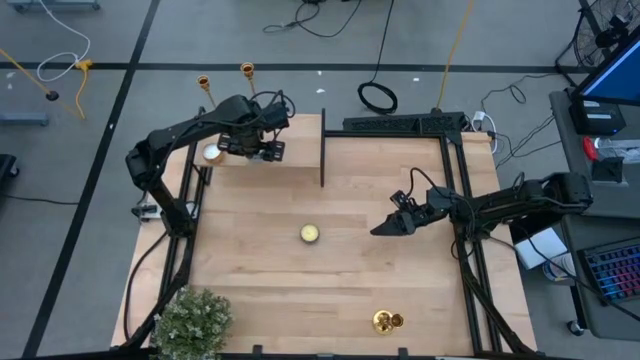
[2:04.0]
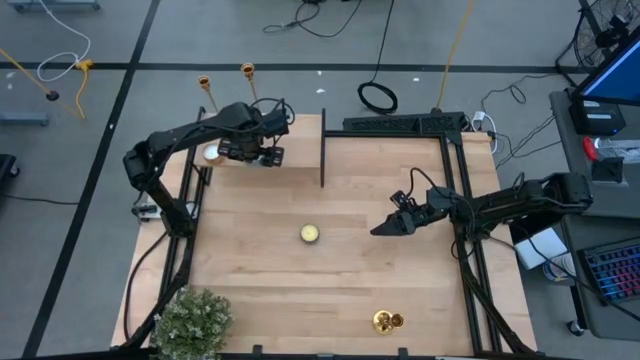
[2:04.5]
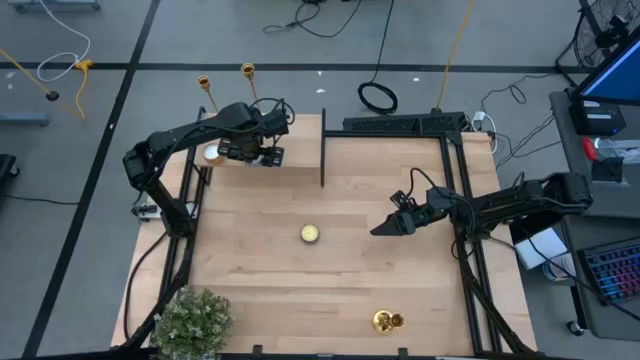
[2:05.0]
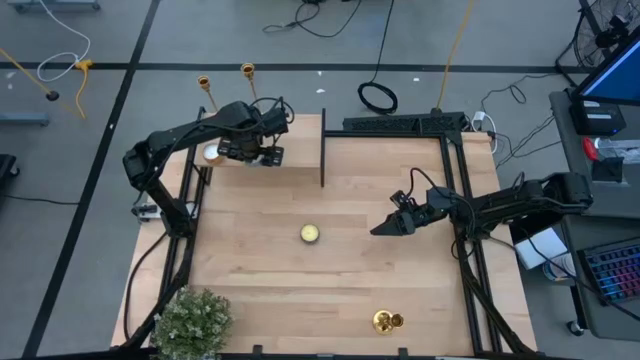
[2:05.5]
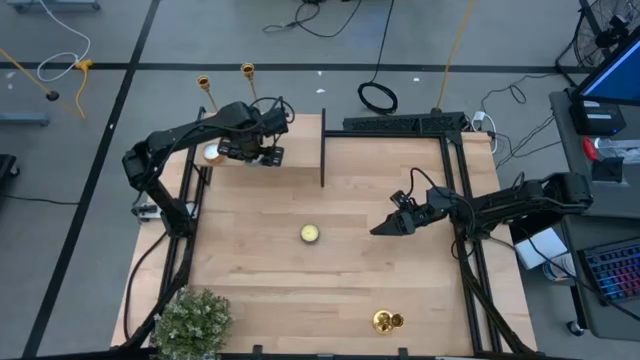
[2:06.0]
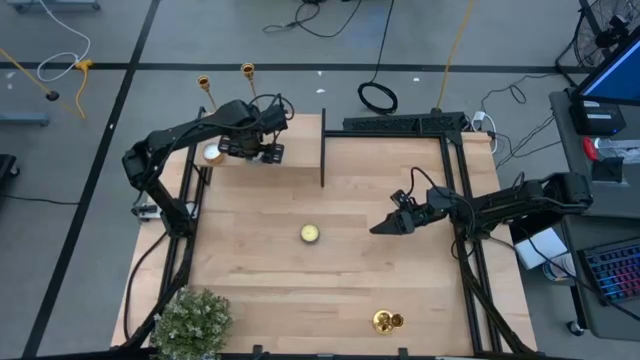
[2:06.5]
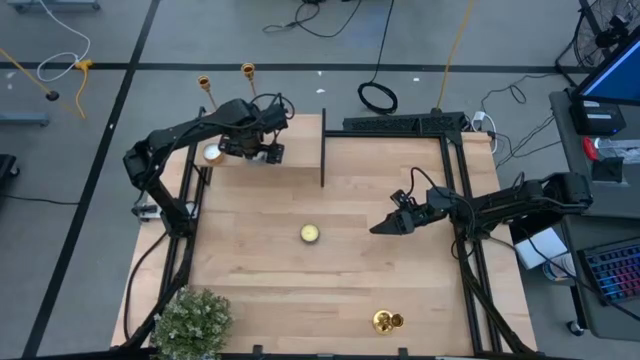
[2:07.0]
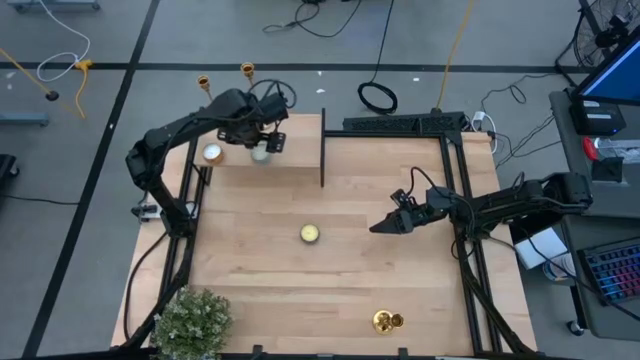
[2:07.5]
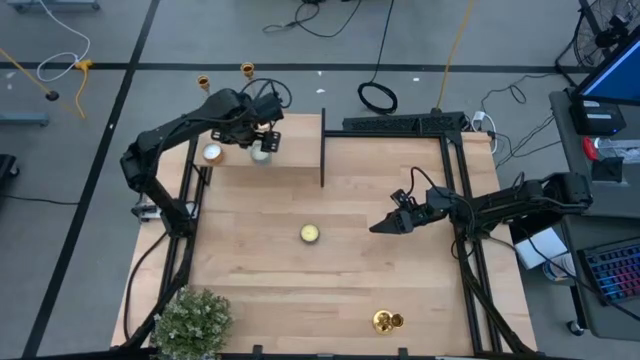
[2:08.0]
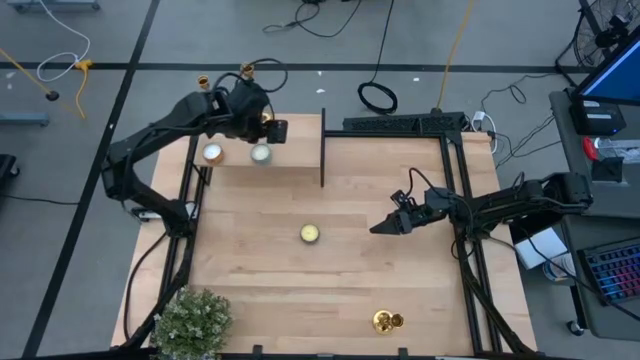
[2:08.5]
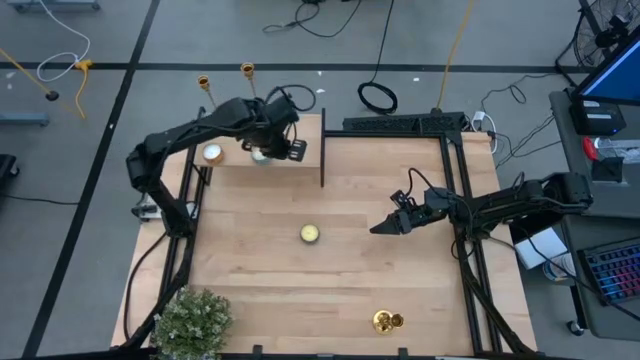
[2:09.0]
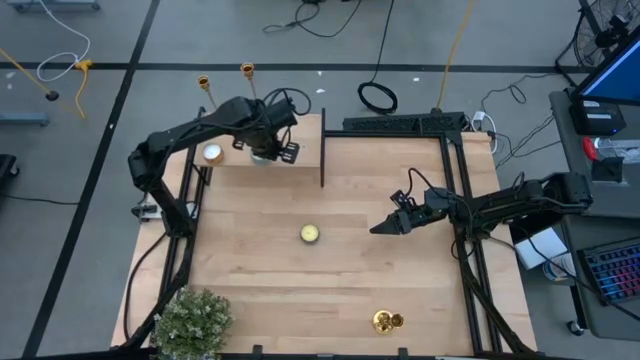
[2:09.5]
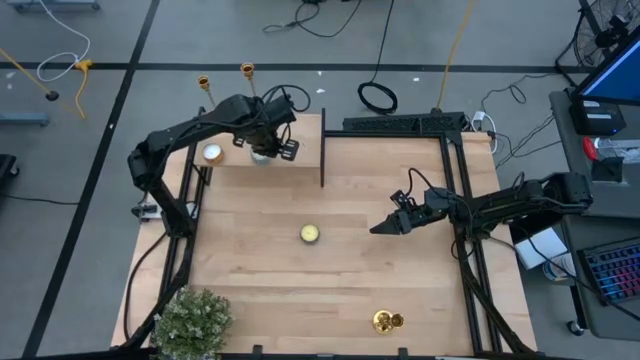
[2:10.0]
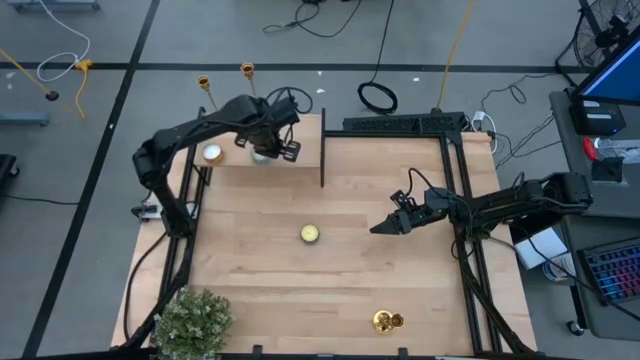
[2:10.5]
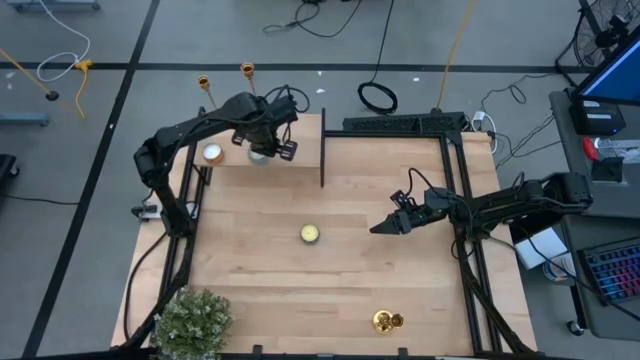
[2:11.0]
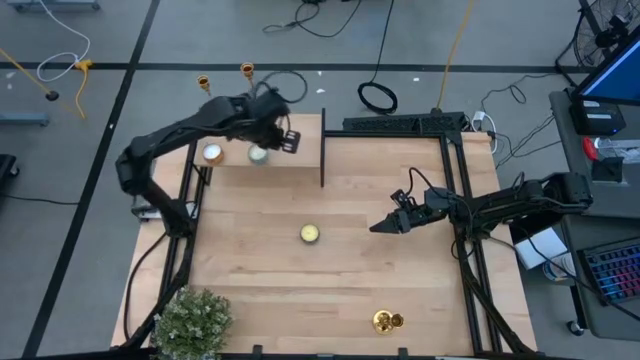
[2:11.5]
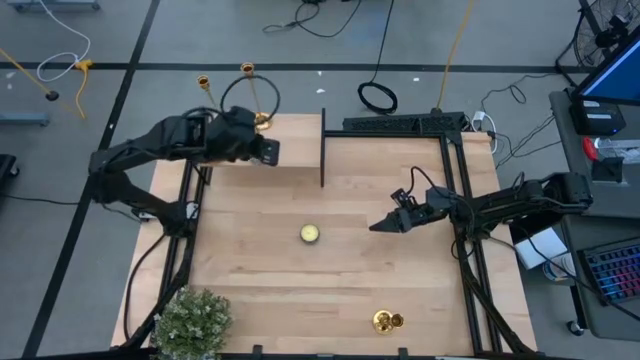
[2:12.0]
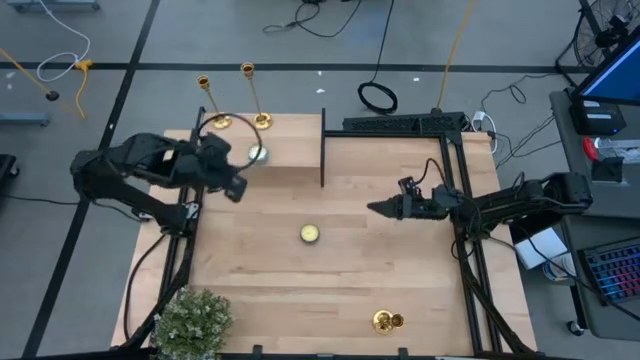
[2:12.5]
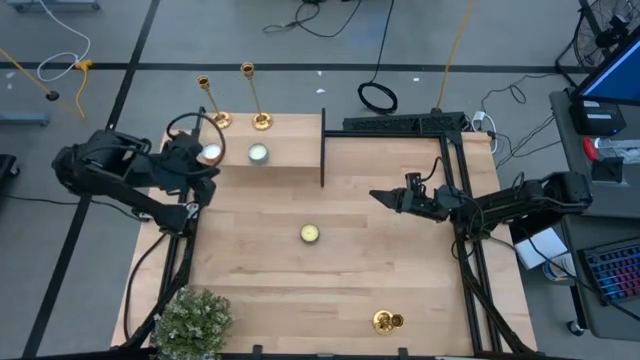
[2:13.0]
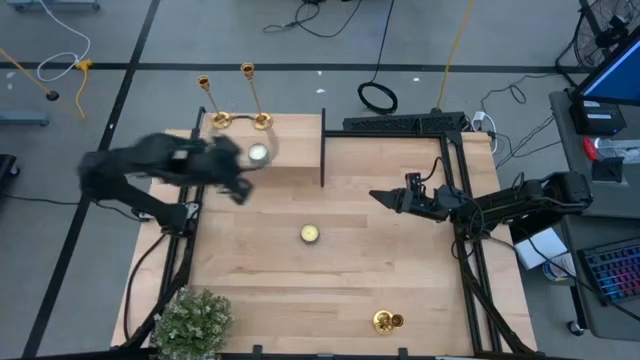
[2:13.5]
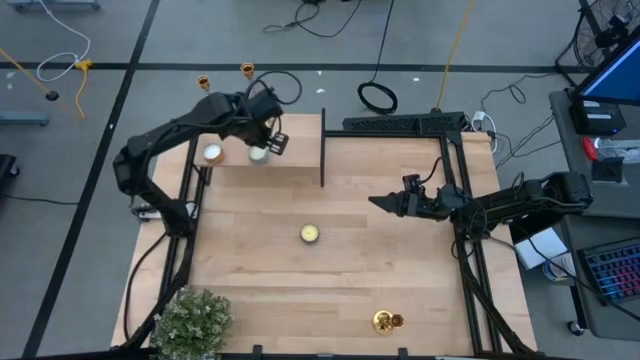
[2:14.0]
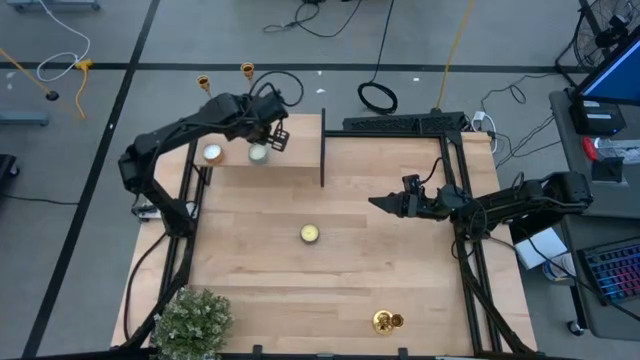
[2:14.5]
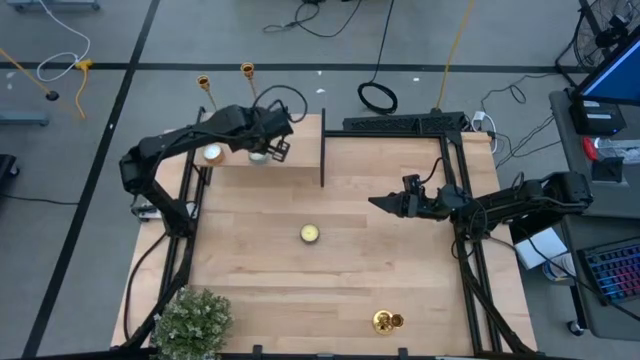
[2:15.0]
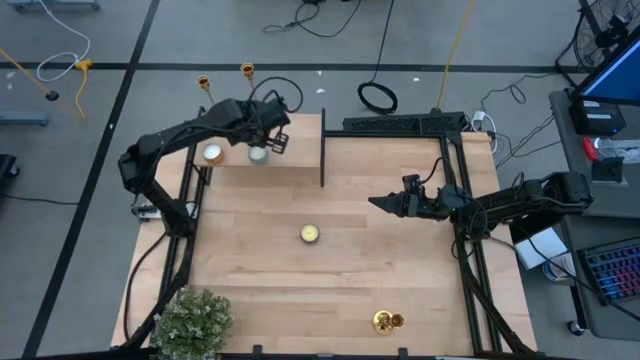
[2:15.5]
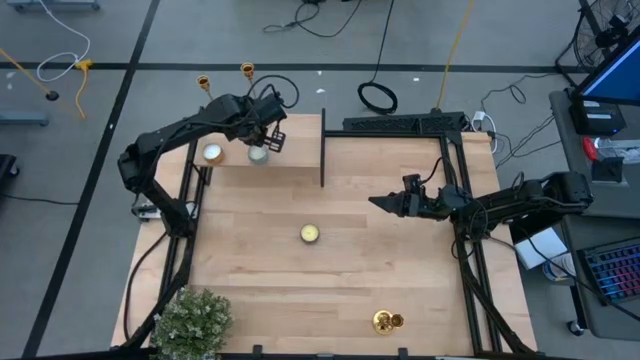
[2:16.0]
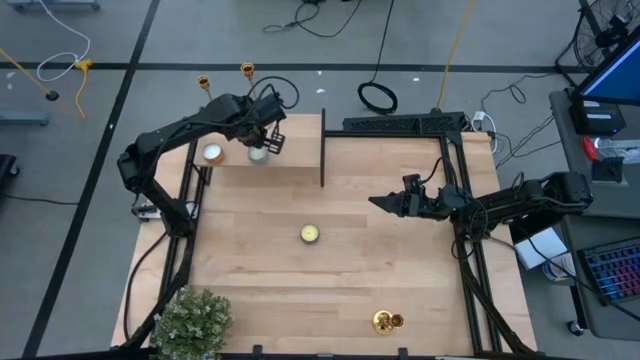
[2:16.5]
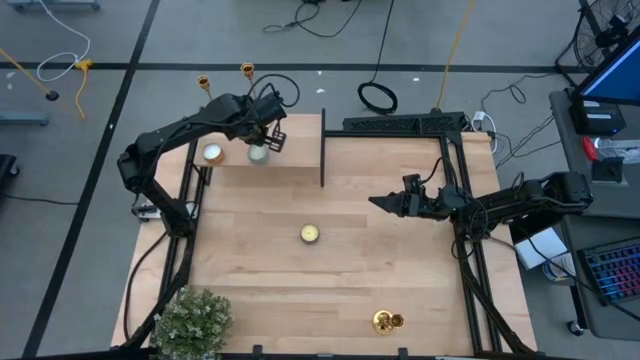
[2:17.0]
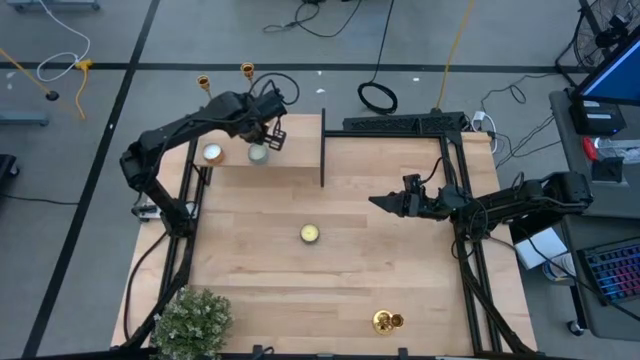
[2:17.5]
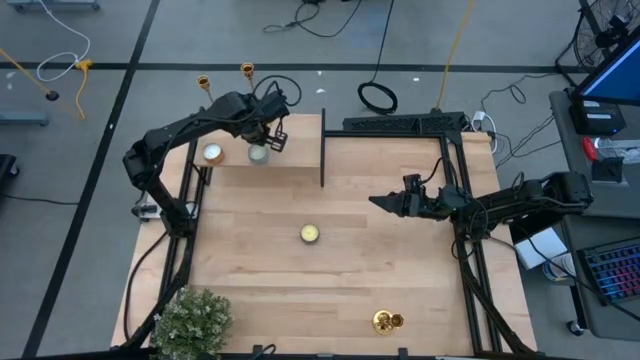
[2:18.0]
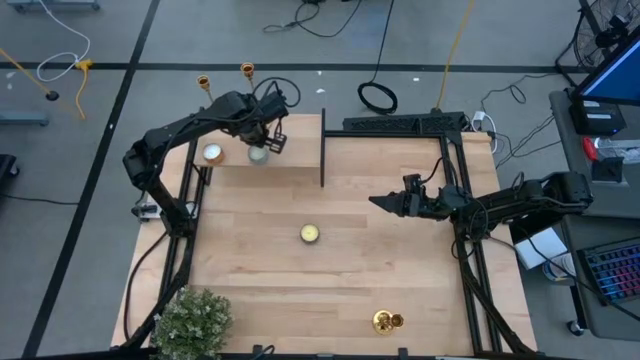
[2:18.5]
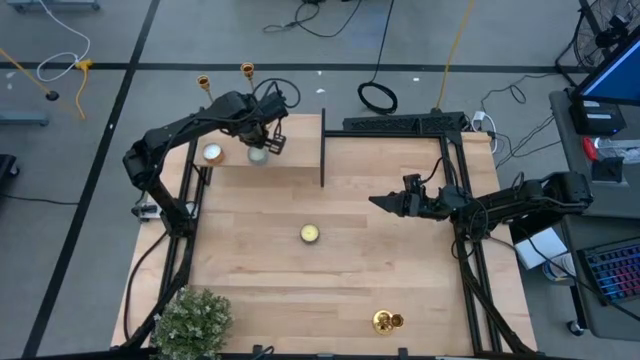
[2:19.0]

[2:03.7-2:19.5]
Task: Pick & Place candle stick holders
Put the blue scented candle on the shelf
